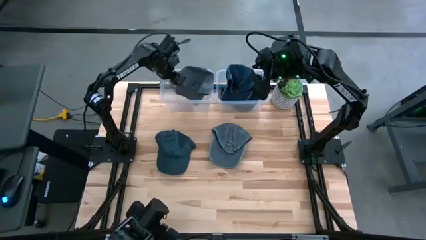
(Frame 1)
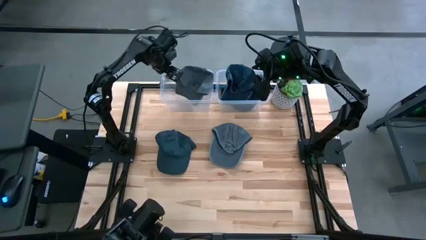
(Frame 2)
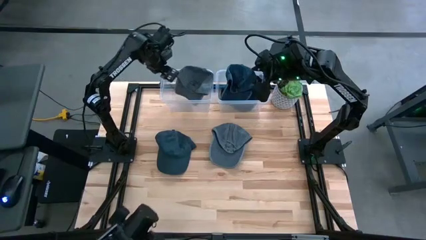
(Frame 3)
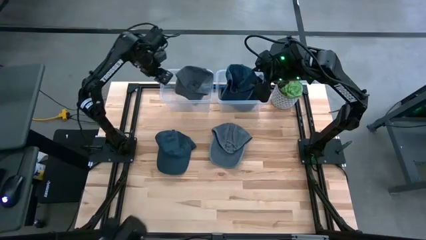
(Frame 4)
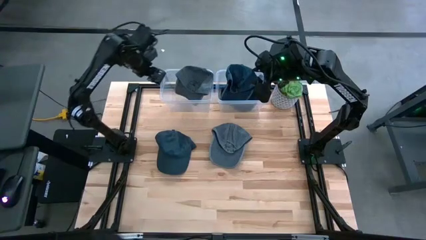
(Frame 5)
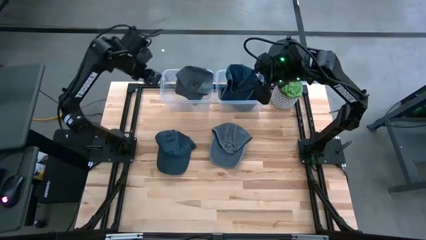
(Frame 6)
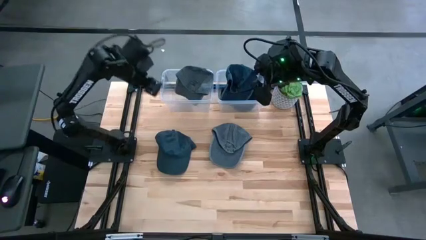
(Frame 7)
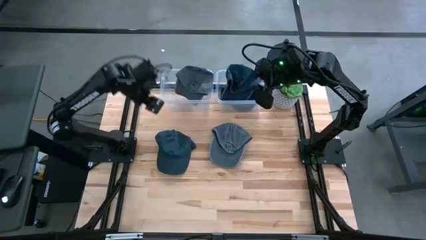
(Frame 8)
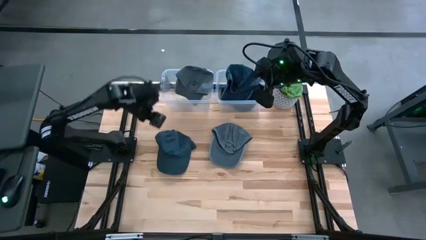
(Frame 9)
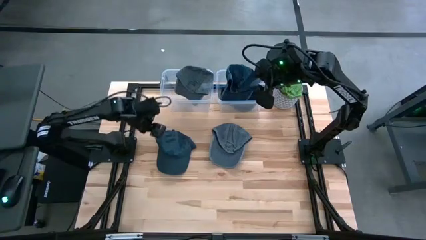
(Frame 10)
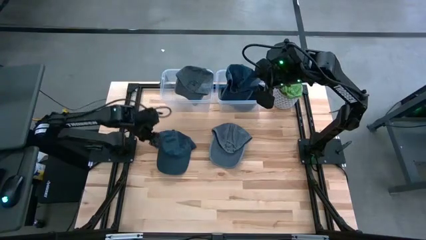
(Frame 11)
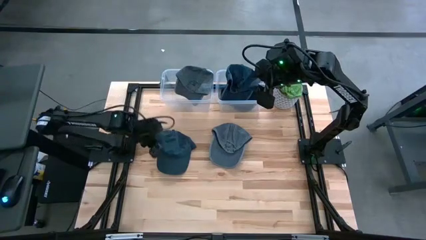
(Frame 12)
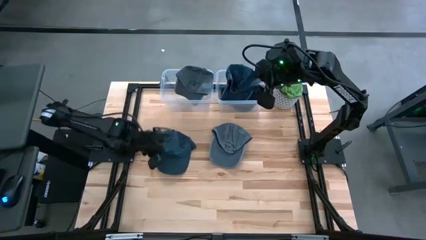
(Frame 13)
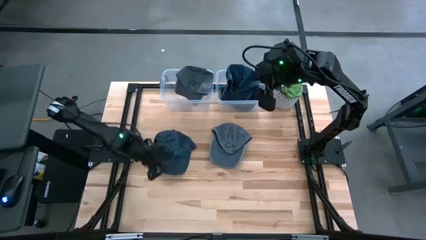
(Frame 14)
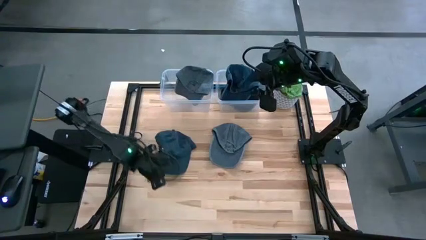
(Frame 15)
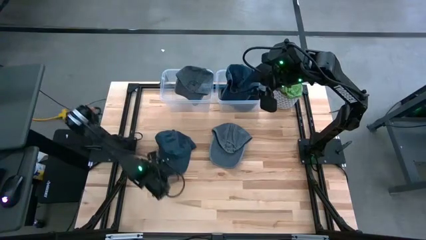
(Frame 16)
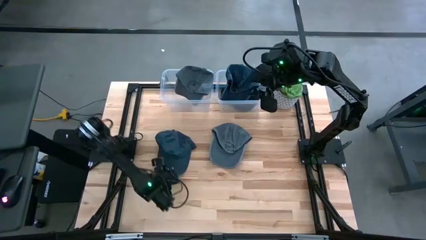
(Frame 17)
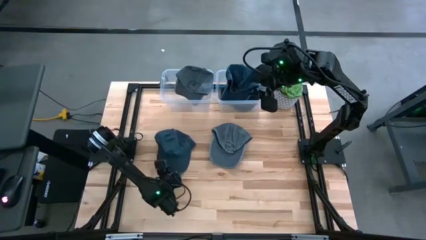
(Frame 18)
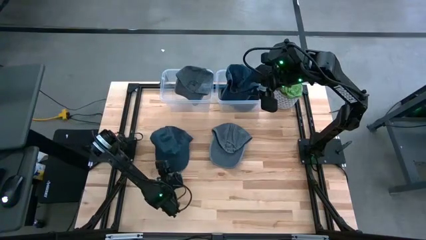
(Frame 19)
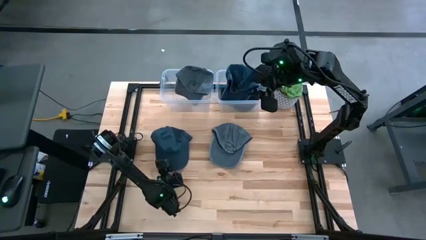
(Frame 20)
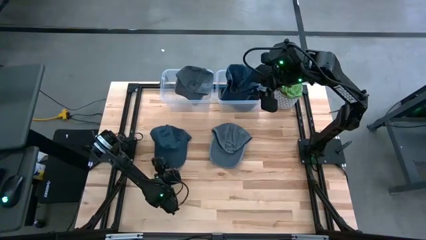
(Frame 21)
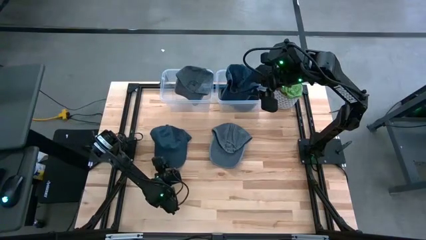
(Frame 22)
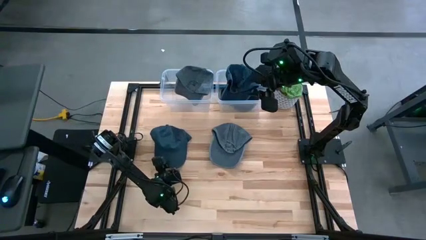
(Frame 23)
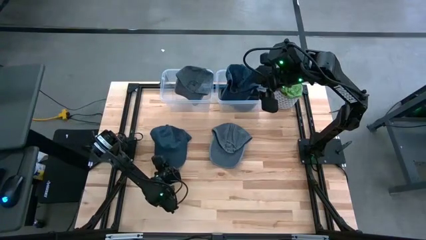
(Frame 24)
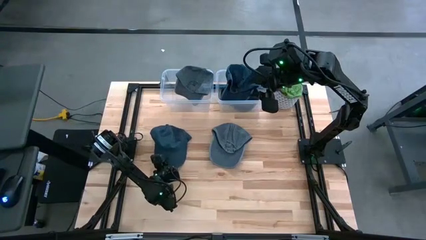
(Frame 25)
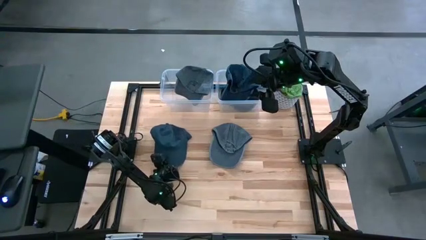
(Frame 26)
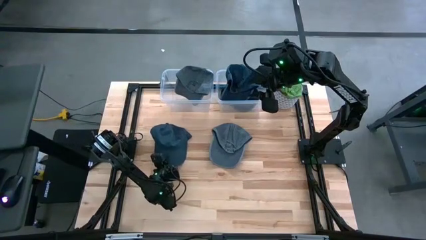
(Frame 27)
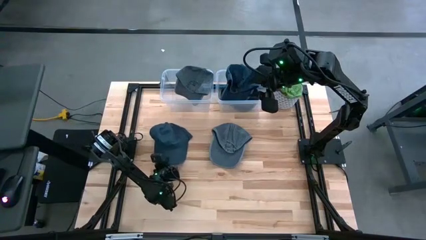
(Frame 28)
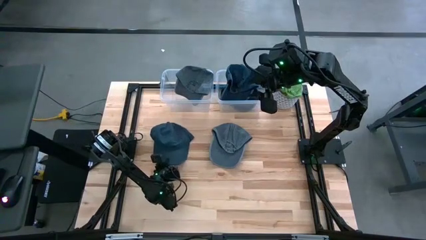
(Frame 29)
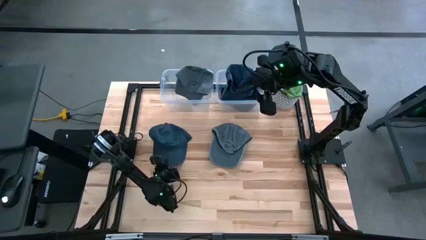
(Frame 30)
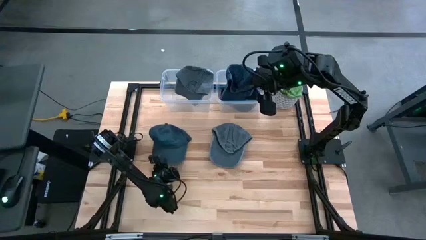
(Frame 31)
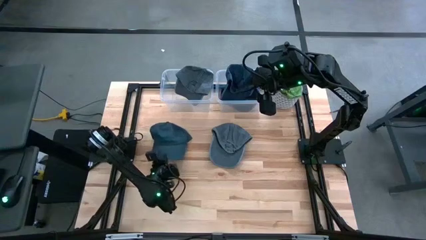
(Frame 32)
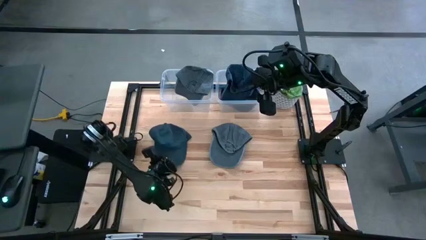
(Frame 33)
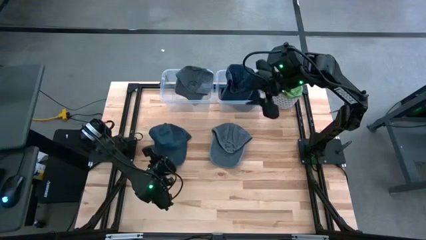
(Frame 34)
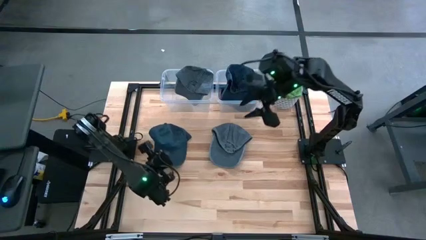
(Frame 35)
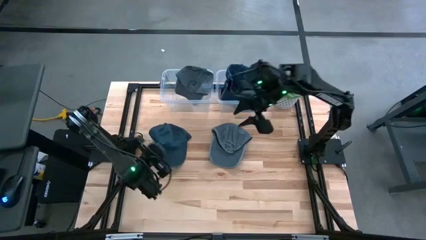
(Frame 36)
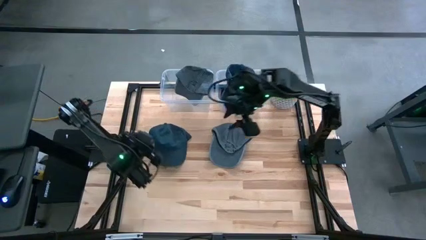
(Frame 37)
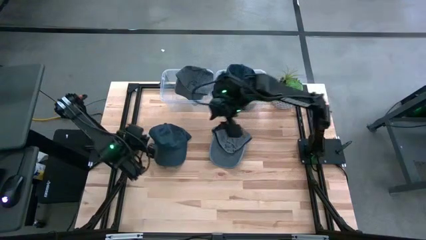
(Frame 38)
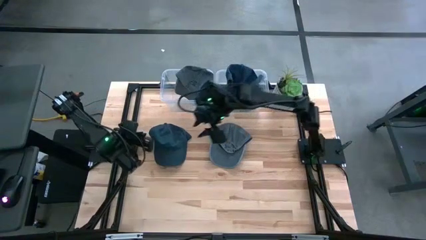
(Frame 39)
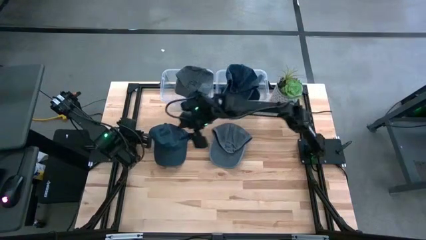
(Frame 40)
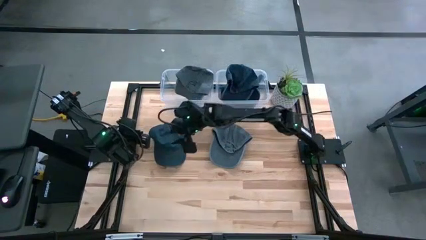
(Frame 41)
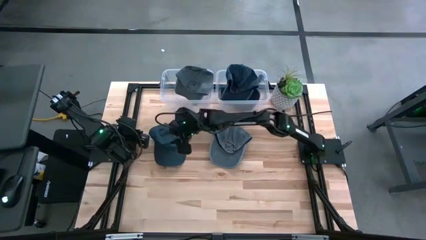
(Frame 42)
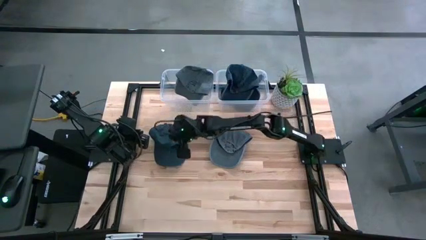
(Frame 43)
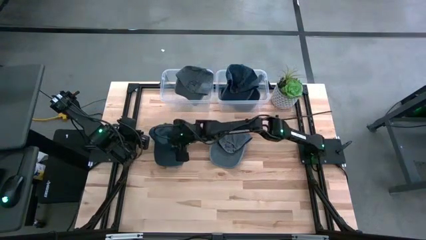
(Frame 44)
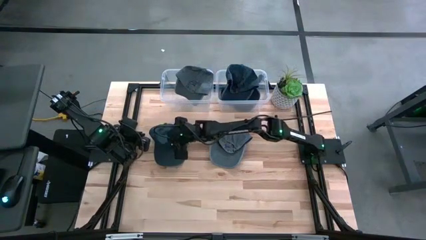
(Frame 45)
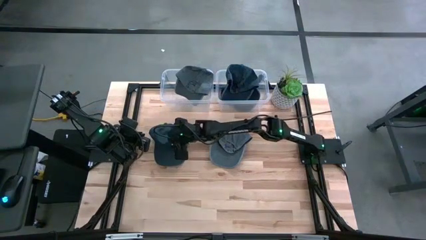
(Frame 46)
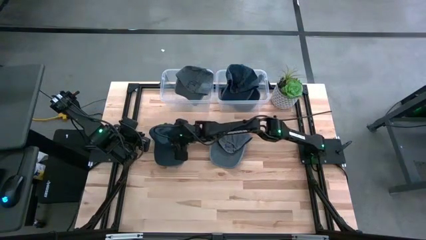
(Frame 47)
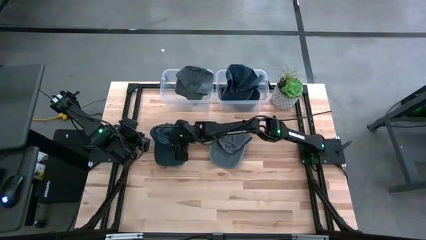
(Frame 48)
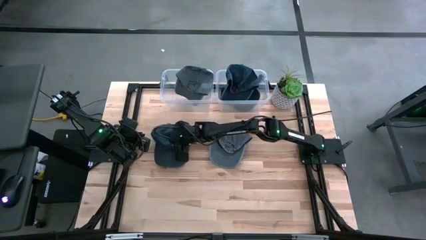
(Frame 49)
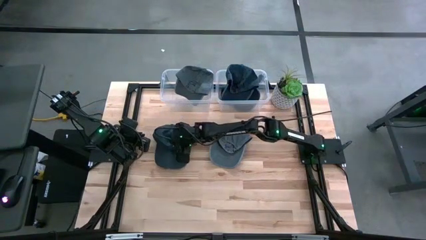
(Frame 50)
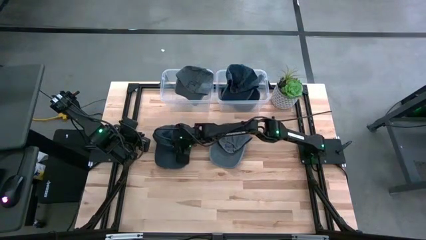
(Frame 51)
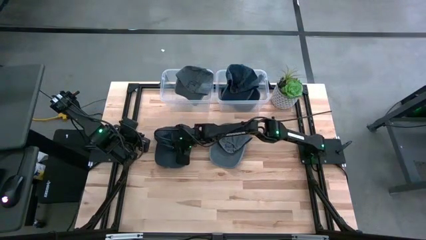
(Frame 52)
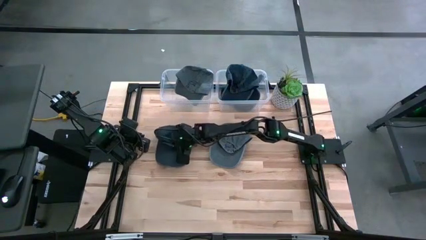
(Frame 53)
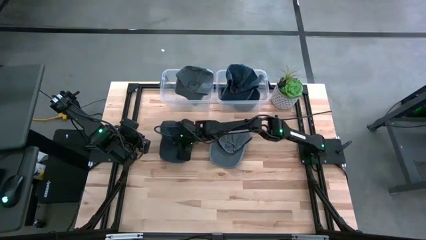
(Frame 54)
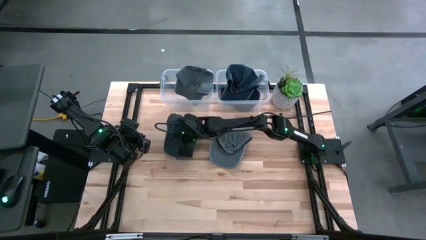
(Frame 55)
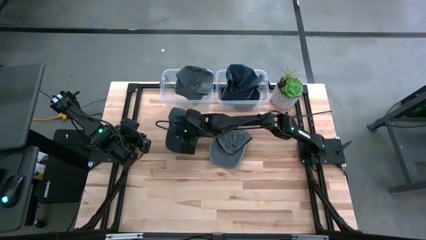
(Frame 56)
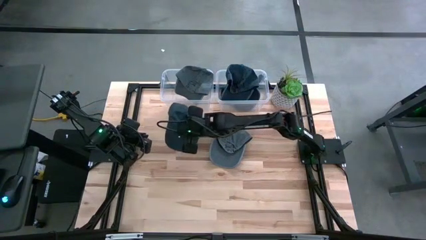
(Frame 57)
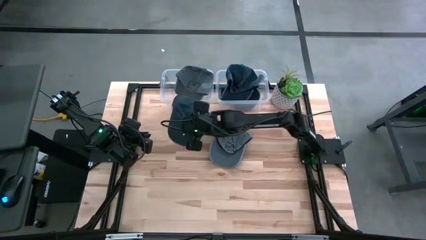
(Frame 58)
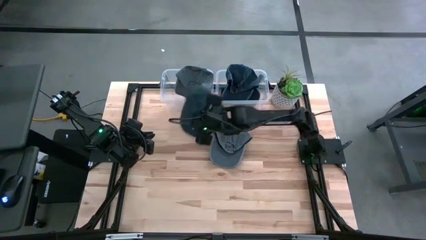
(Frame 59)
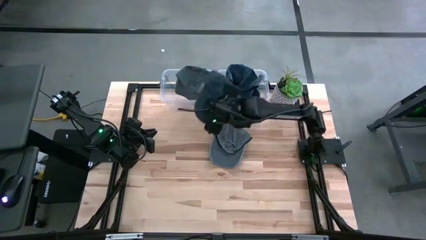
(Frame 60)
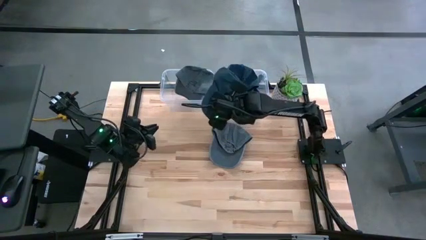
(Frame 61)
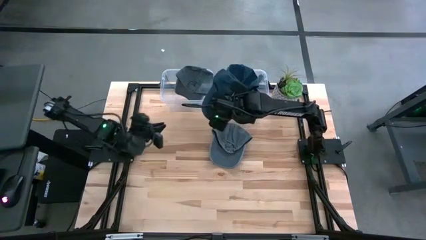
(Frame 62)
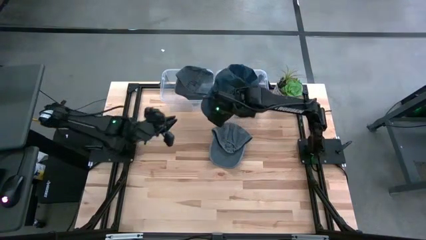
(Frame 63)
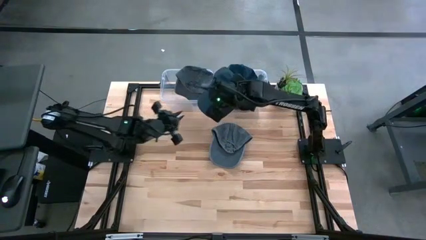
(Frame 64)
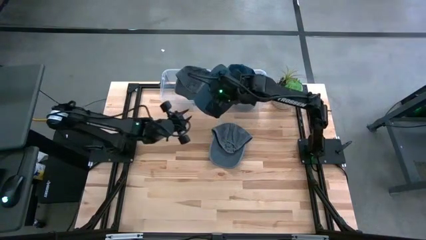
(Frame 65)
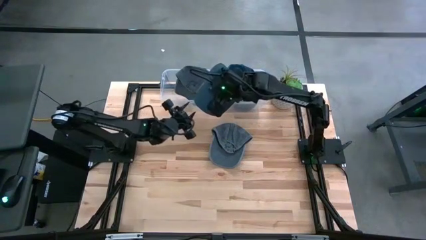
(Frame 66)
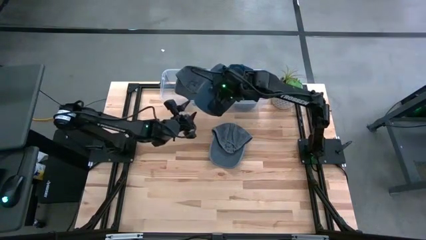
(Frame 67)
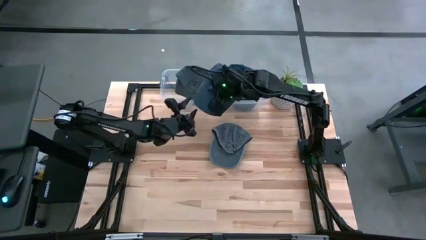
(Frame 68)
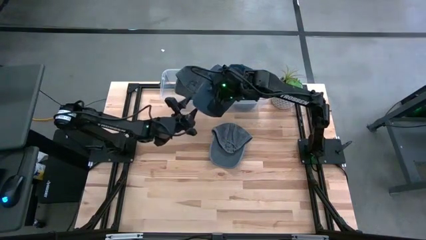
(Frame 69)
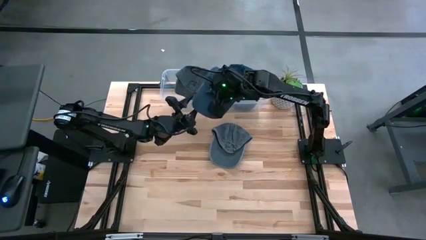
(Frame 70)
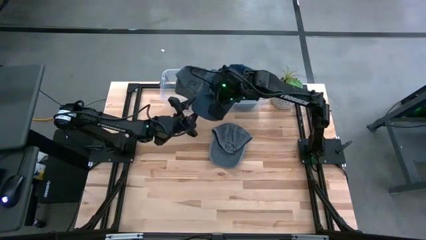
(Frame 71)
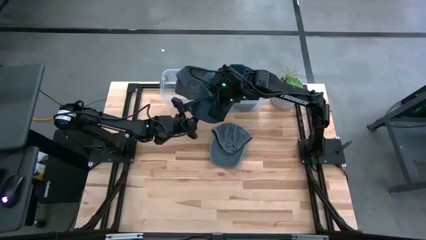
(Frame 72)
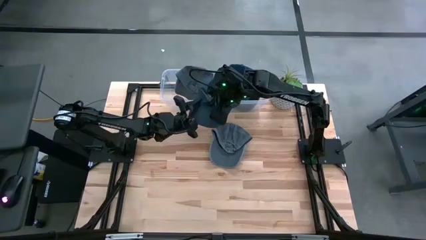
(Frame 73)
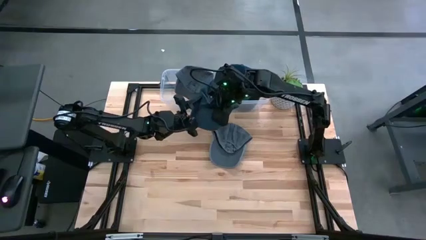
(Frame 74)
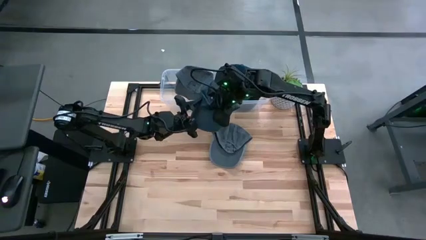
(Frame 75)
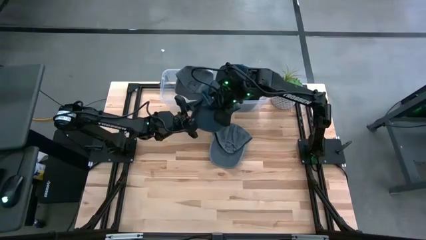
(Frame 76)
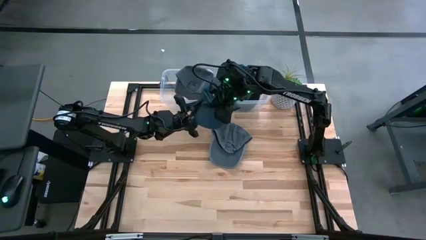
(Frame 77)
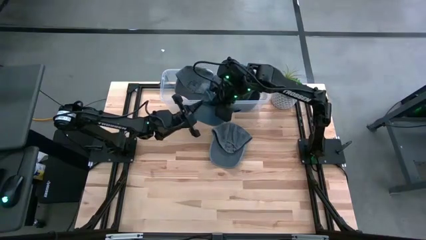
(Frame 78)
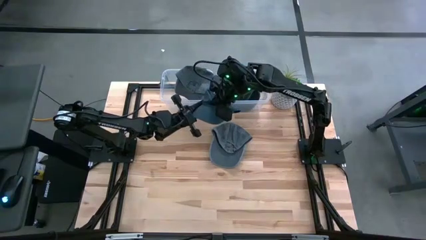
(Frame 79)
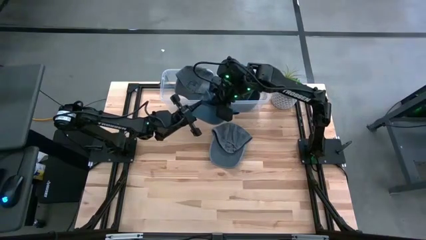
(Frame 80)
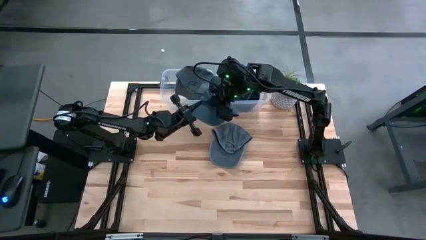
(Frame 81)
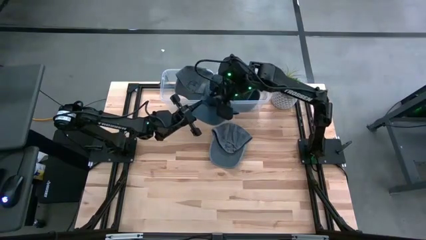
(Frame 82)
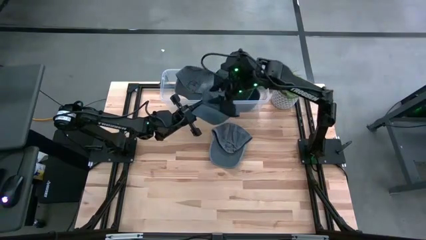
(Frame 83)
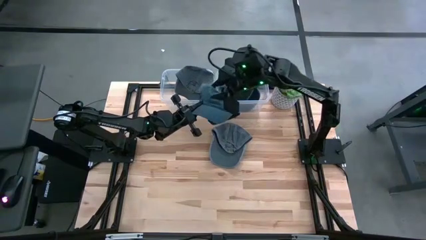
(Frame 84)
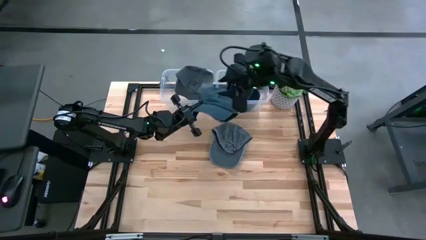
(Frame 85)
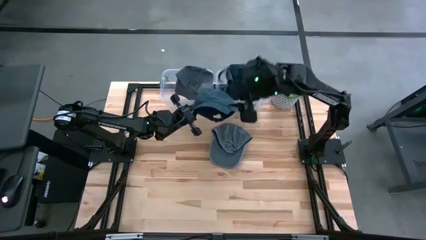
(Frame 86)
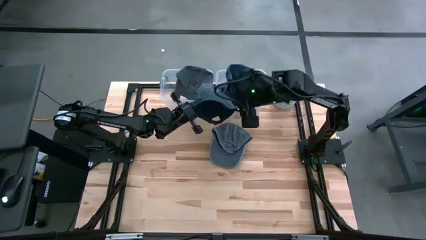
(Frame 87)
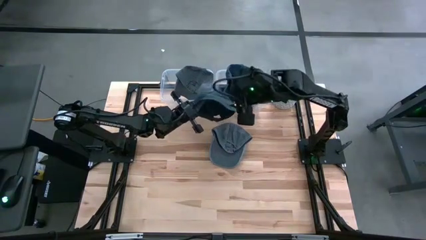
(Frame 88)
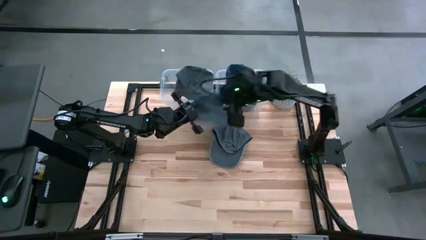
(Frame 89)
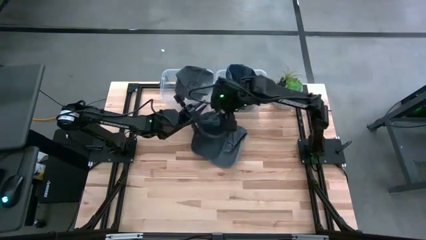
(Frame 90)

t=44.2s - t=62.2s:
Task: Pick & Place hat
Put the blue cap into the right transparent bin
